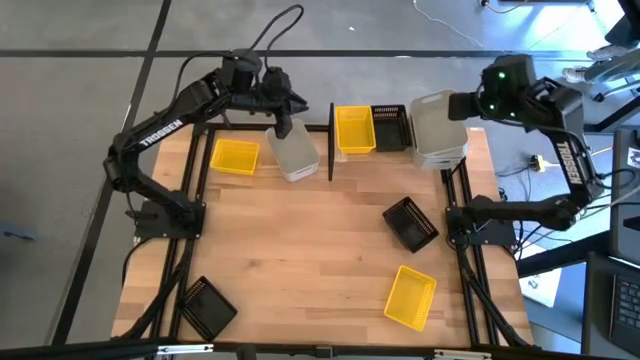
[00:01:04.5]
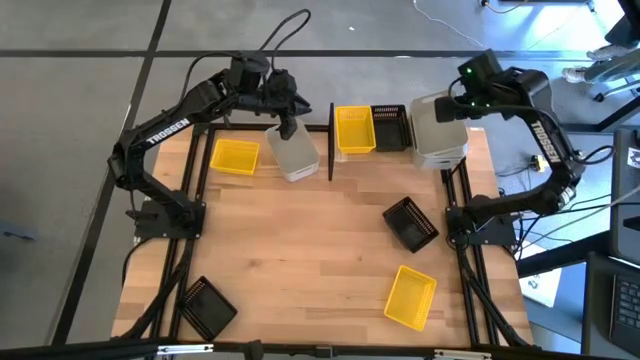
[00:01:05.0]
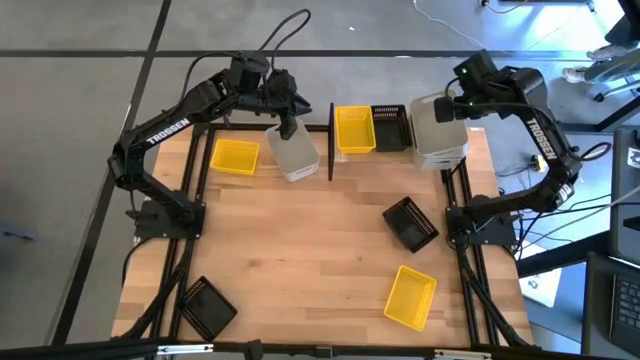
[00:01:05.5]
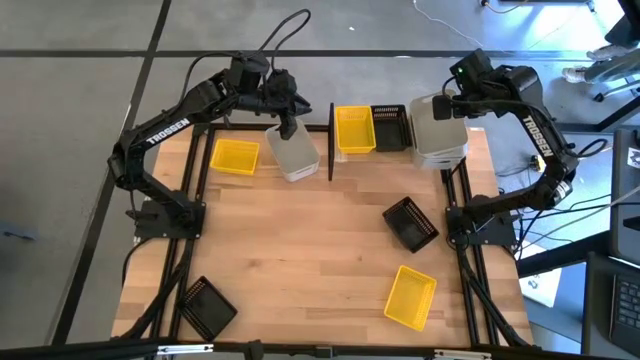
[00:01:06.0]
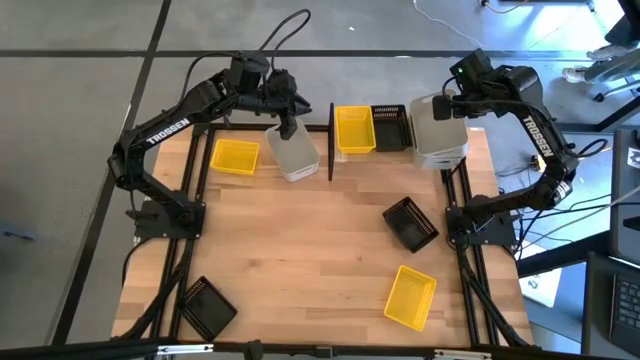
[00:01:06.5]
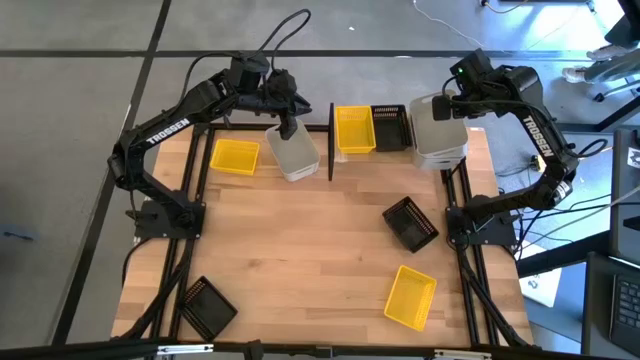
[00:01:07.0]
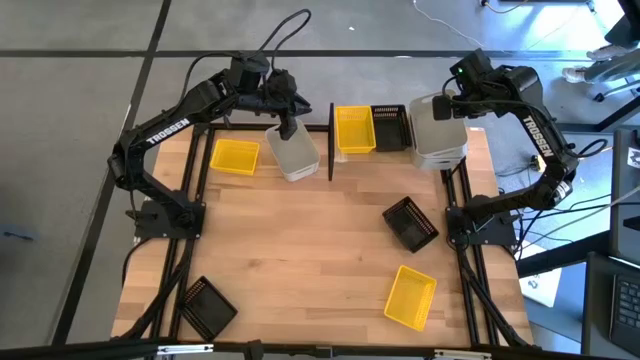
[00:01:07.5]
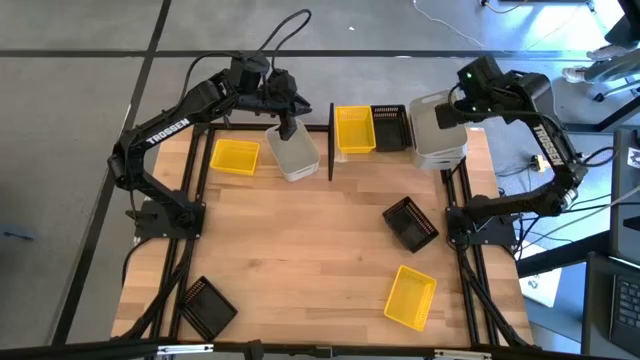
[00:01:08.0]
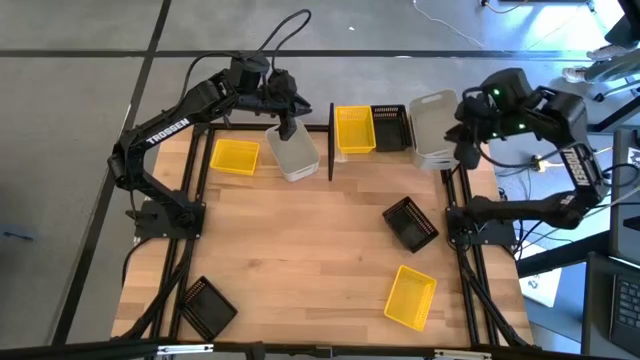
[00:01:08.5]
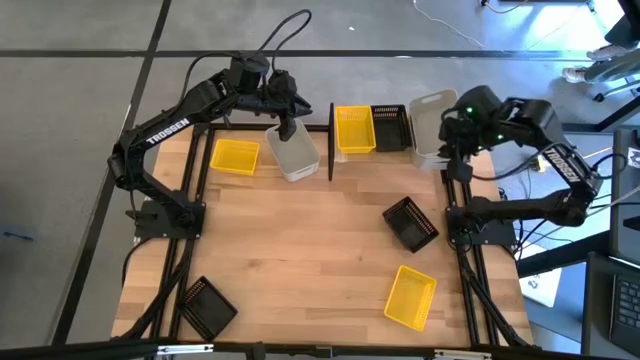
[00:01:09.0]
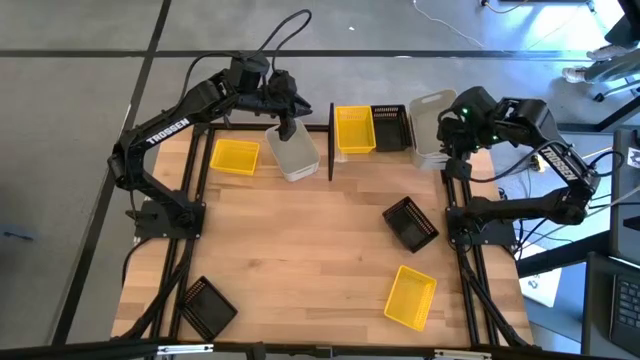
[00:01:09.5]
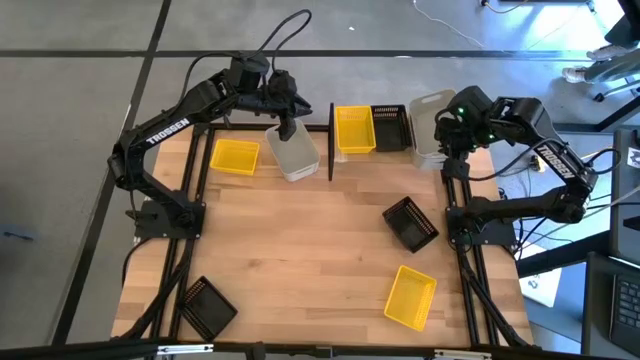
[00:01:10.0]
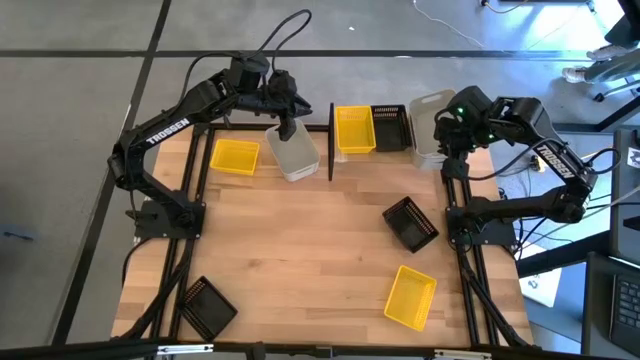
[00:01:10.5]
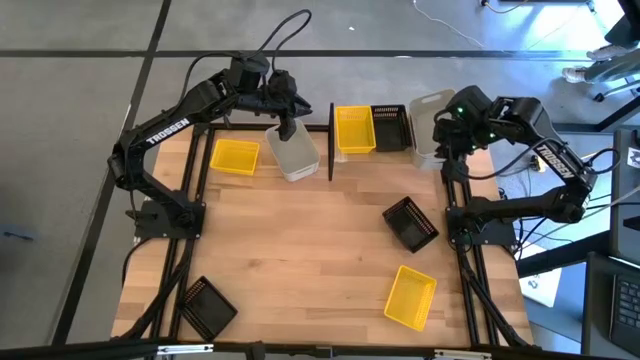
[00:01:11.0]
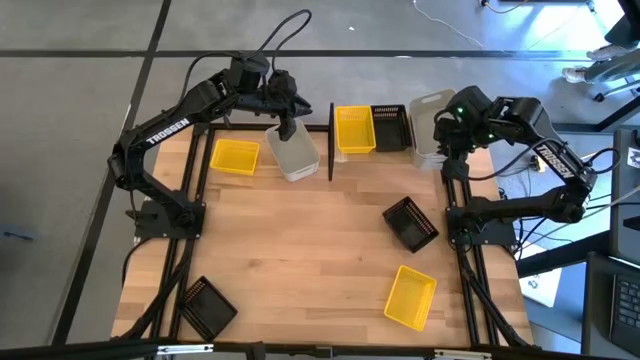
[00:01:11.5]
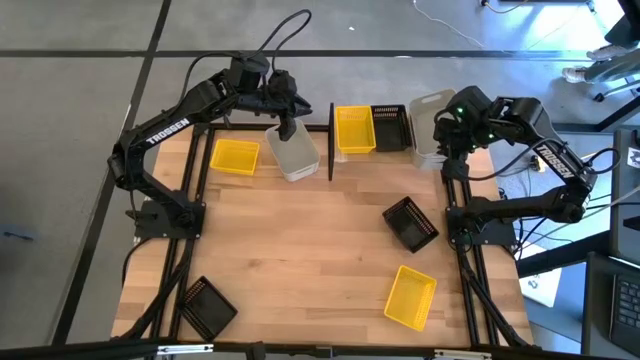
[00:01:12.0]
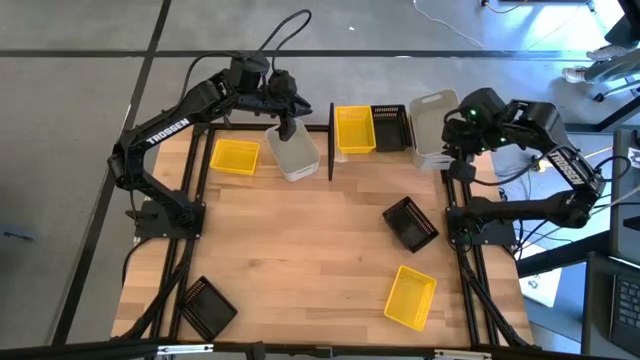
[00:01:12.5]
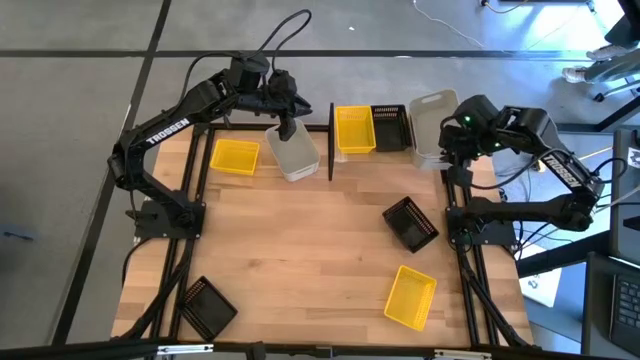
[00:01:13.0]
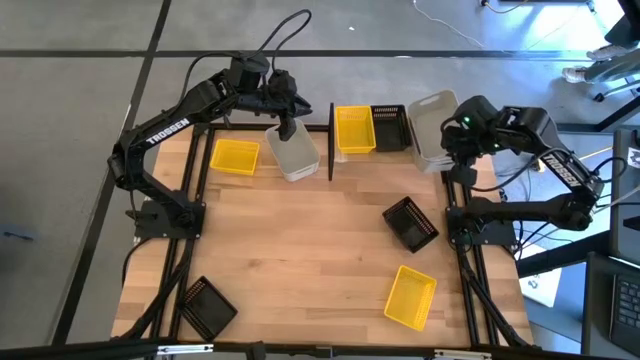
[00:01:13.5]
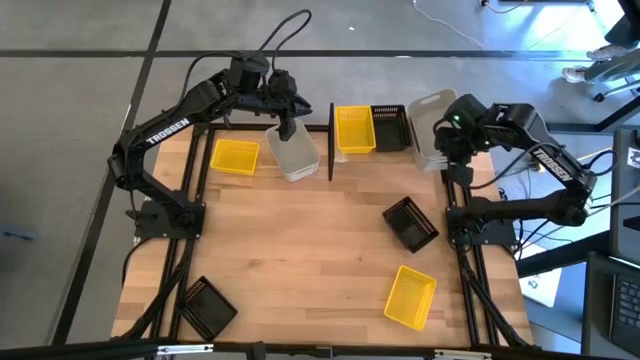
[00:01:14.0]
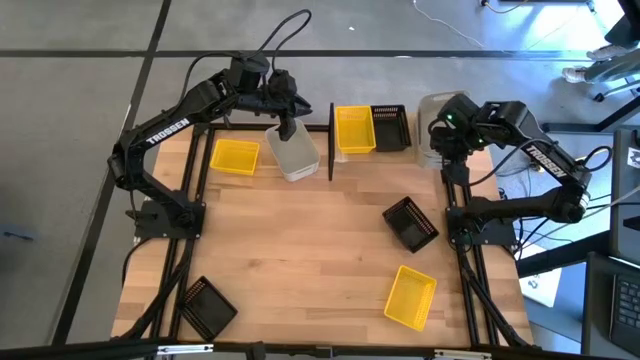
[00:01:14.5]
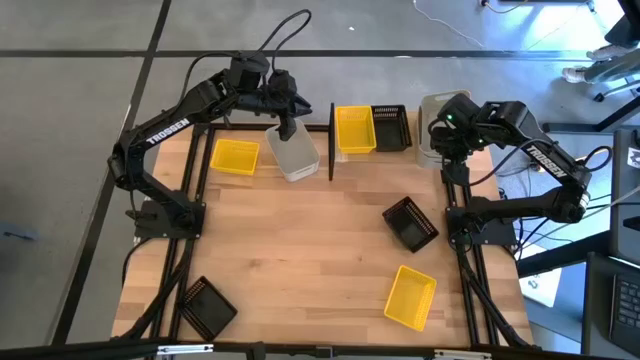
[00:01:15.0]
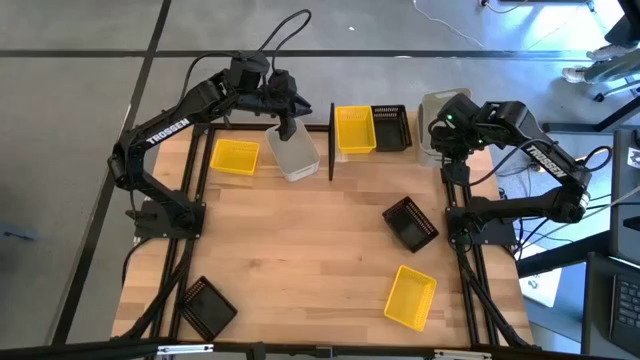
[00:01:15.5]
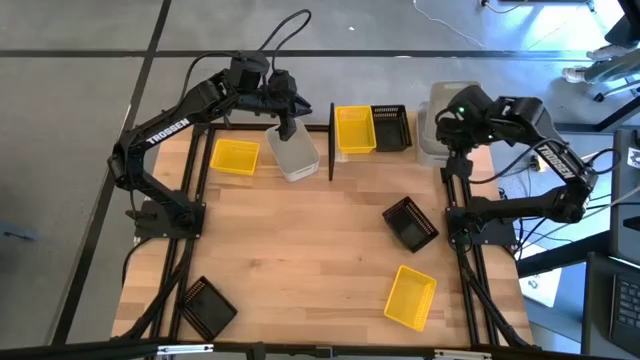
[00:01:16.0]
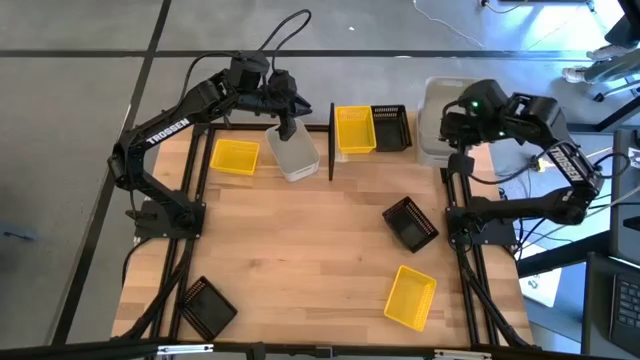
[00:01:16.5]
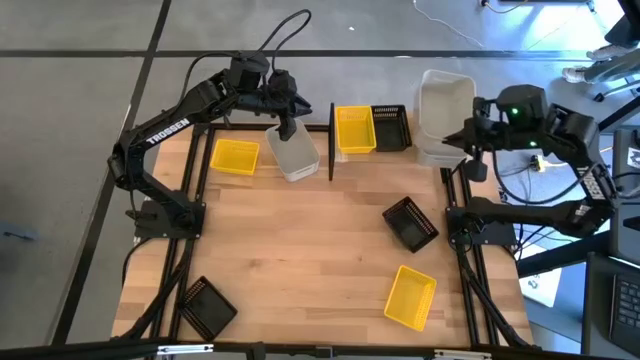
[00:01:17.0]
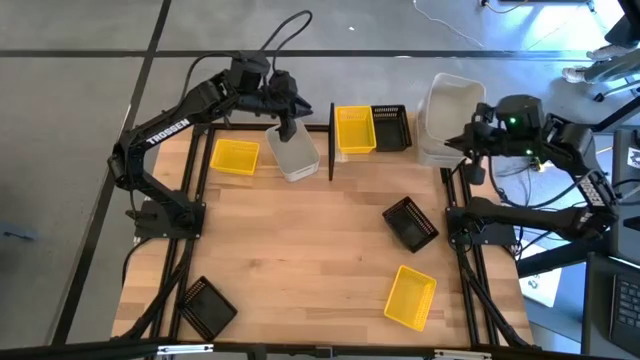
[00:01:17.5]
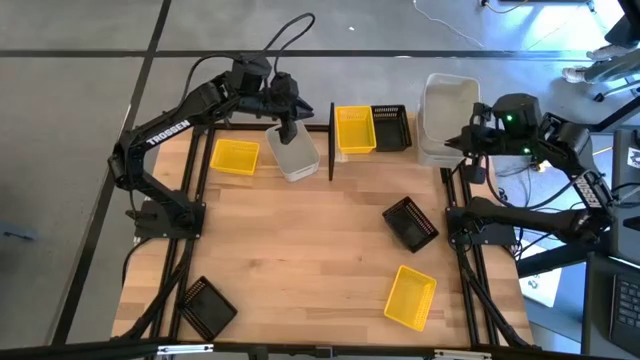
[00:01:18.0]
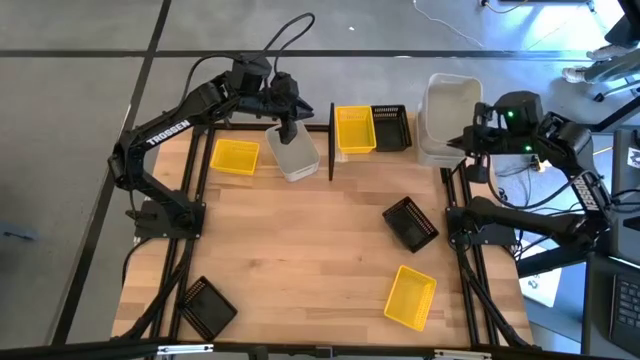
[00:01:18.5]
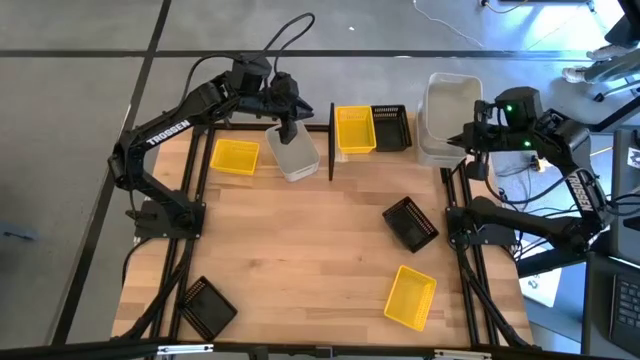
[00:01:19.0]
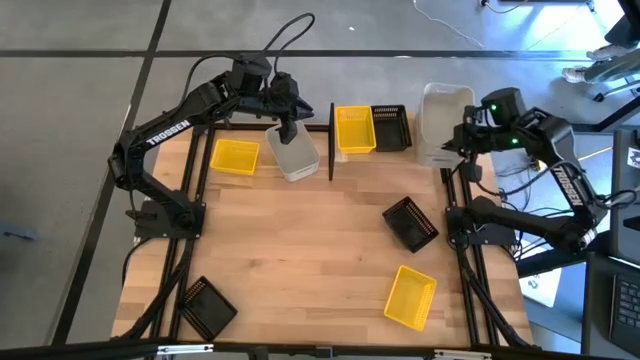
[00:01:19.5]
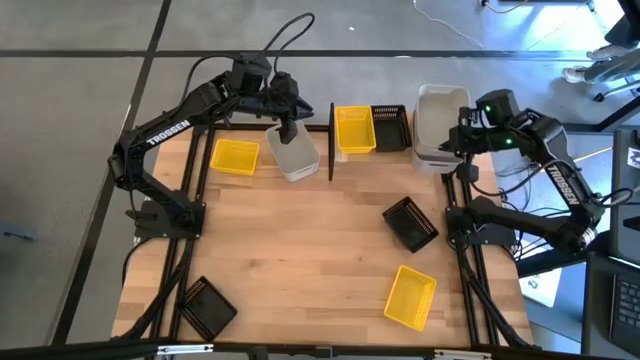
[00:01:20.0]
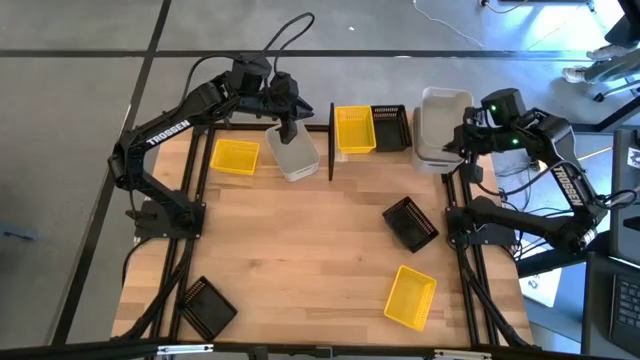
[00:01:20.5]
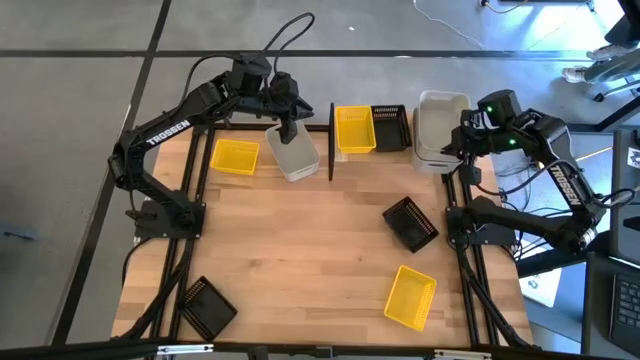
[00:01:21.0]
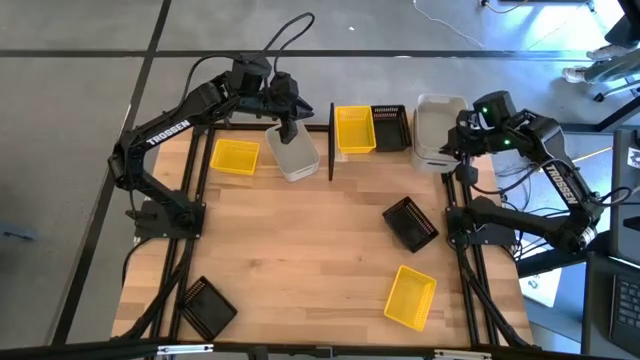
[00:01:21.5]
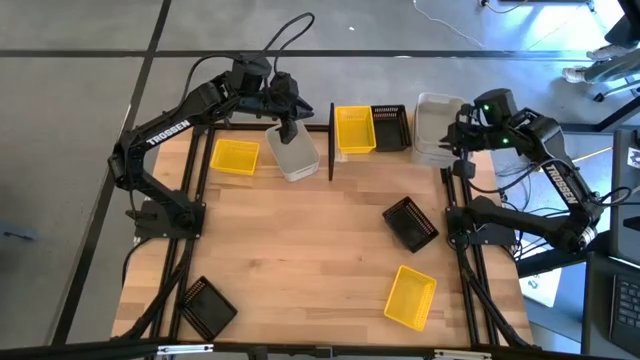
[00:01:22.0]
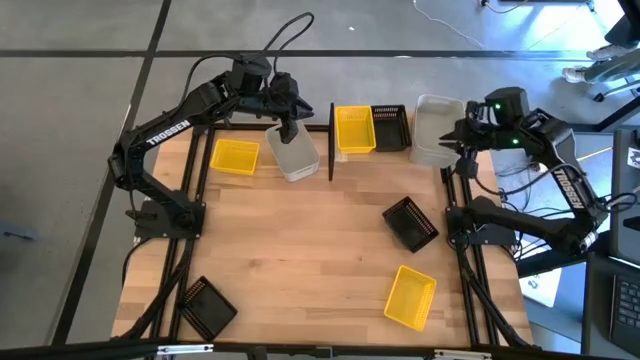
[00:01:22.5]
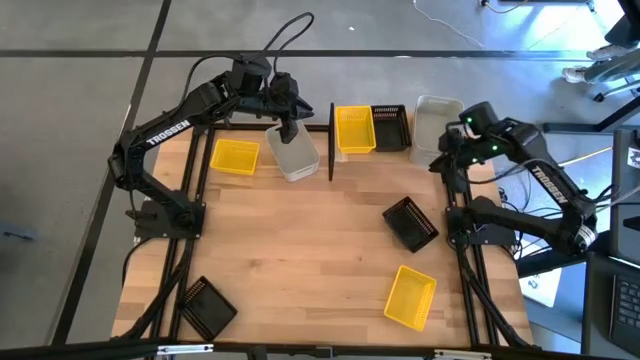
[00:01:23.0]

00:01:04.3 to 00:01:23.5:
Task: Stack baskets on shelf by color
Stack the bottom white bin on top of the white bin on the shelf

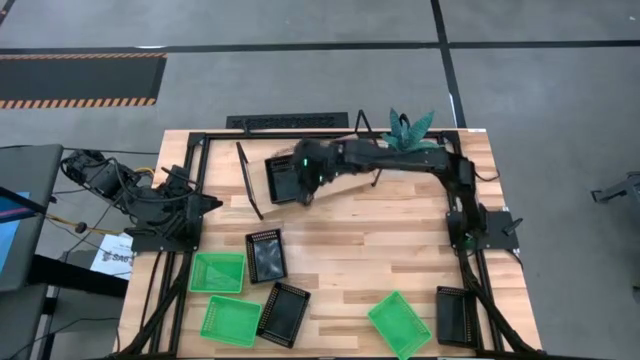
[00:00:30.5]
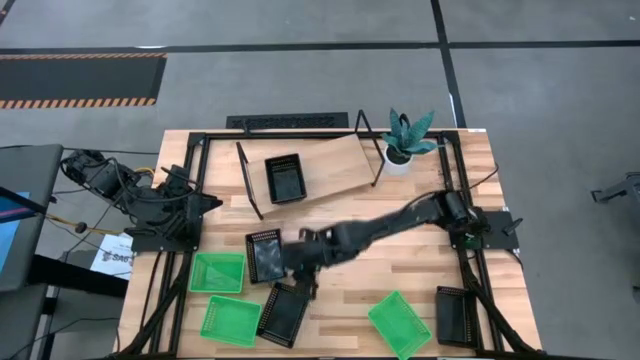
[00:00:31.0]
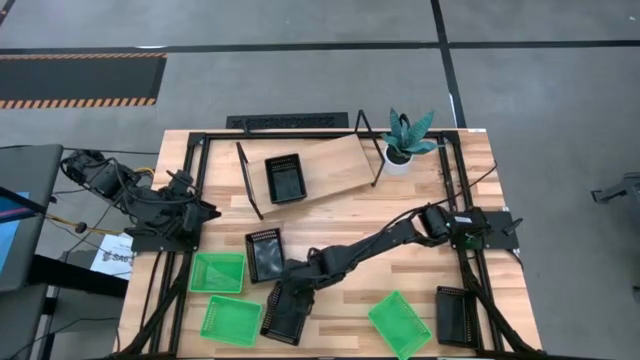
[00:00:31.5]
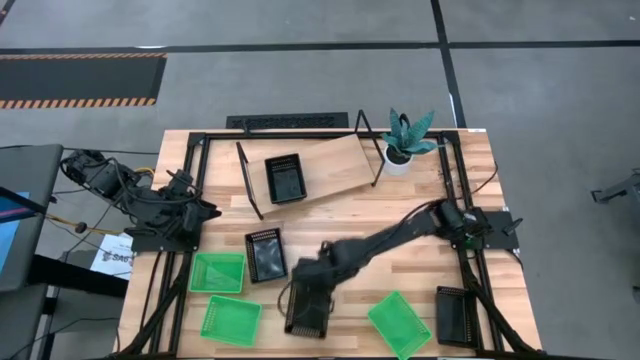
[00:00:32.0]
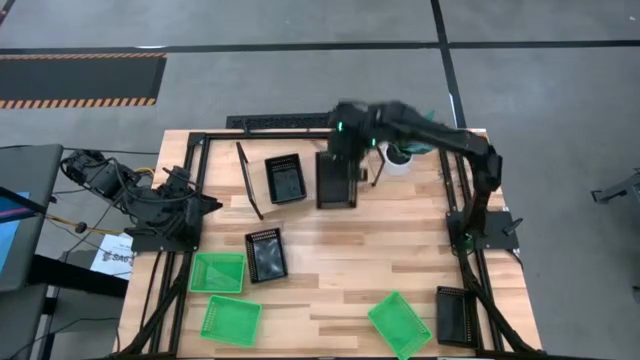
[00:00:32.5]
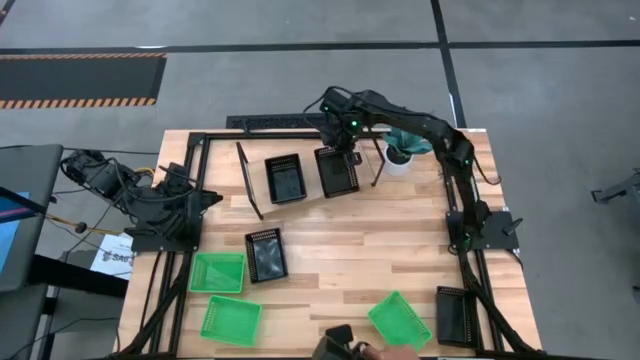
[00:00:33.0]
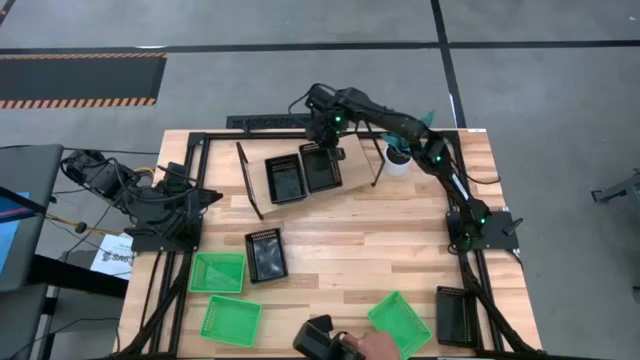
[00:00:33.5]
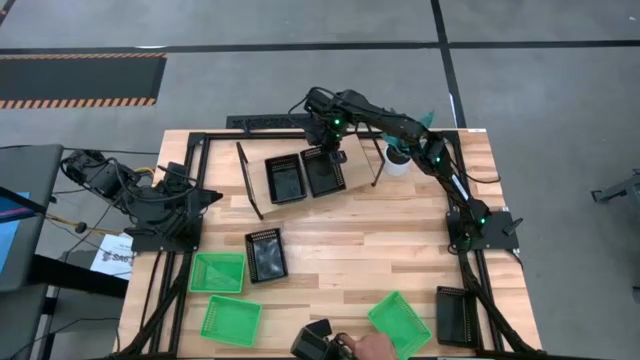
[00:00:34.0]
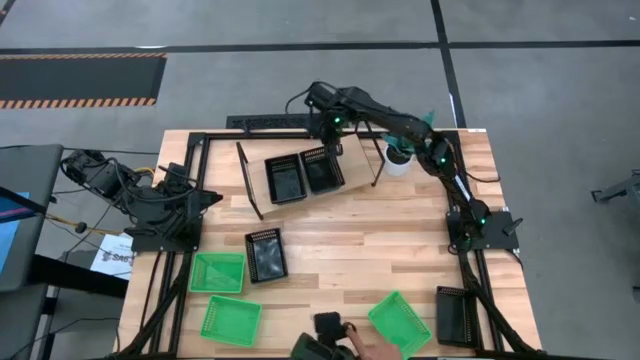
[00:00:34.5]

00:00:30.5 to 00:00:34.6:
Task: Stack baskets on shelf by color
Put the black basket on the shelf
